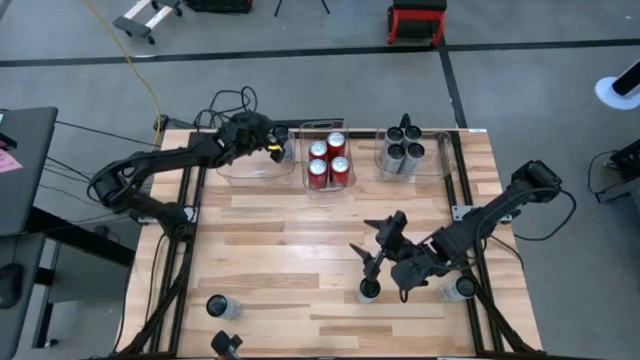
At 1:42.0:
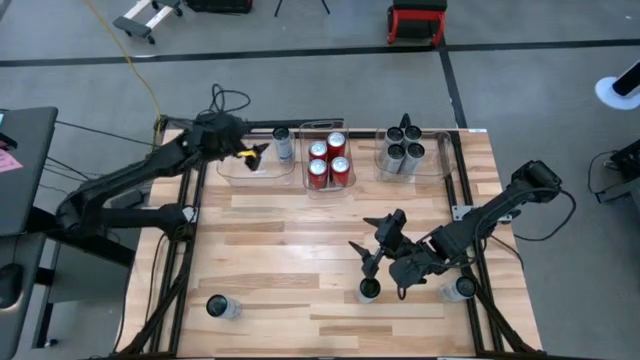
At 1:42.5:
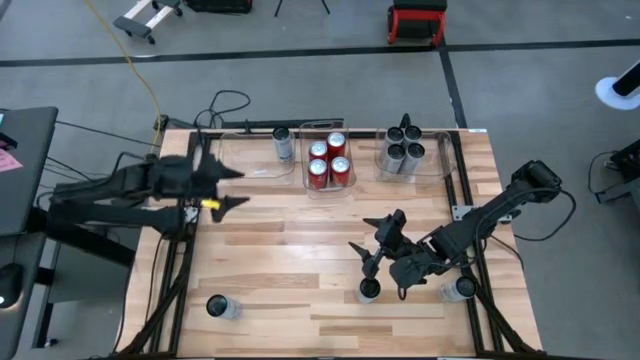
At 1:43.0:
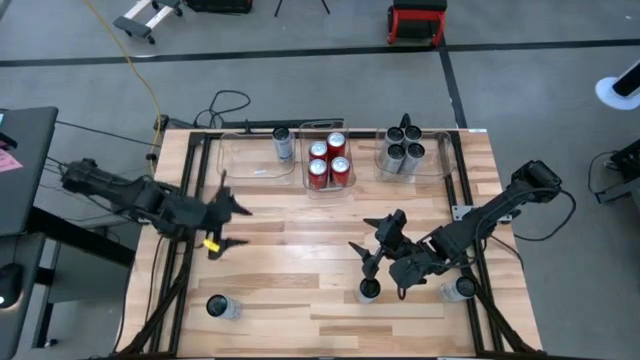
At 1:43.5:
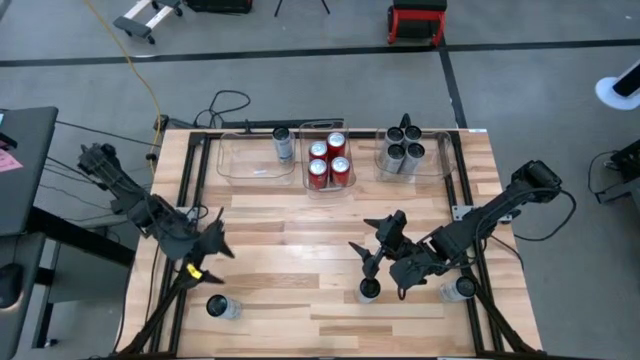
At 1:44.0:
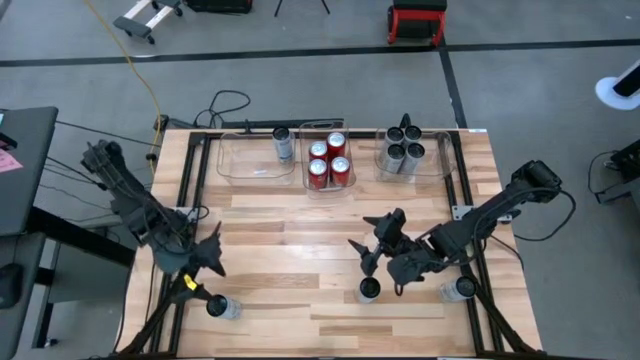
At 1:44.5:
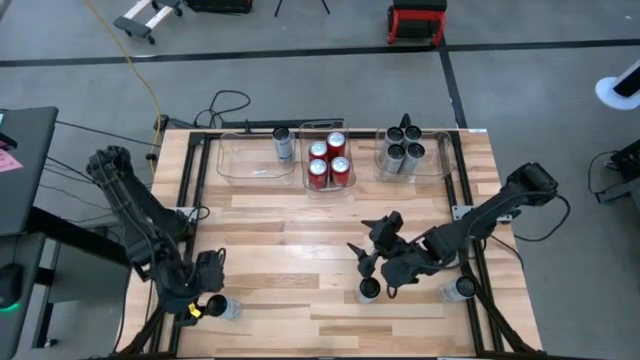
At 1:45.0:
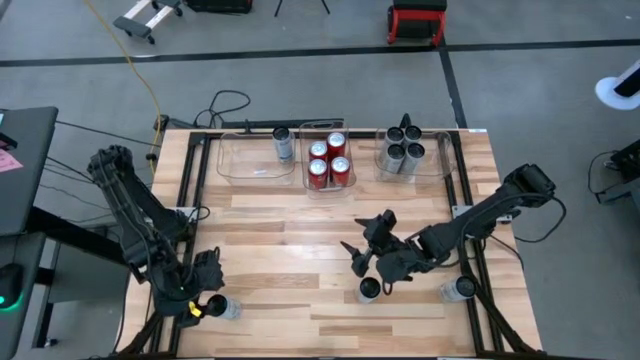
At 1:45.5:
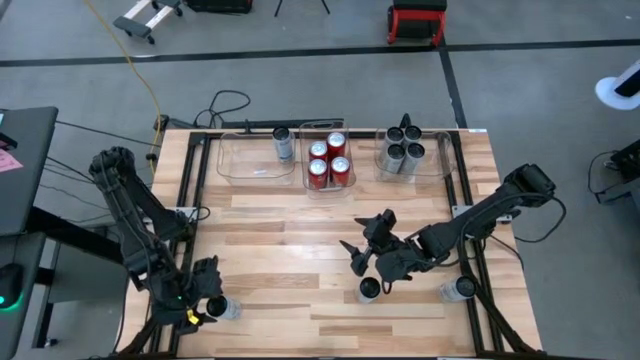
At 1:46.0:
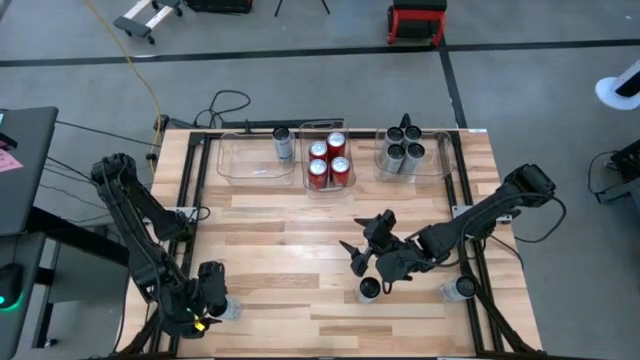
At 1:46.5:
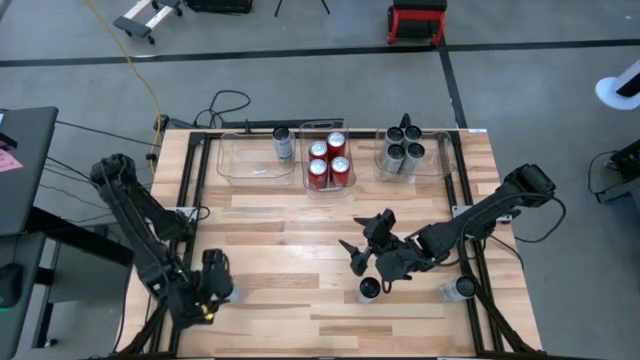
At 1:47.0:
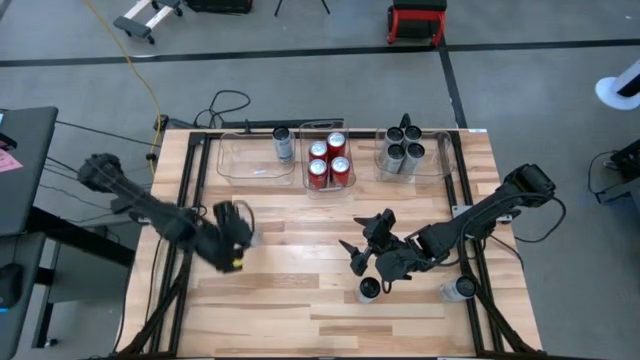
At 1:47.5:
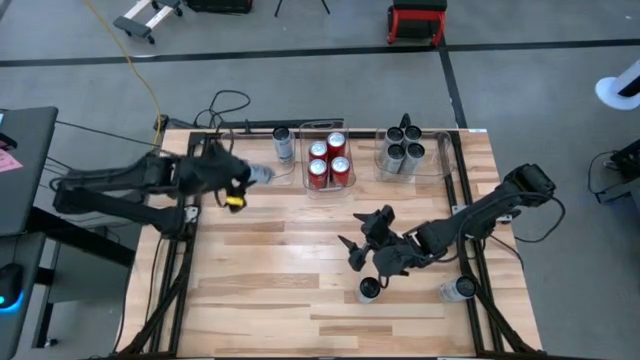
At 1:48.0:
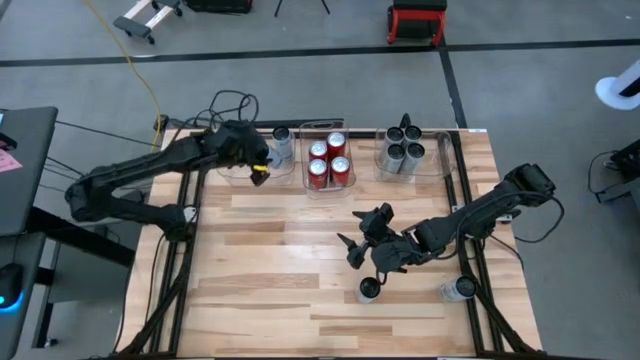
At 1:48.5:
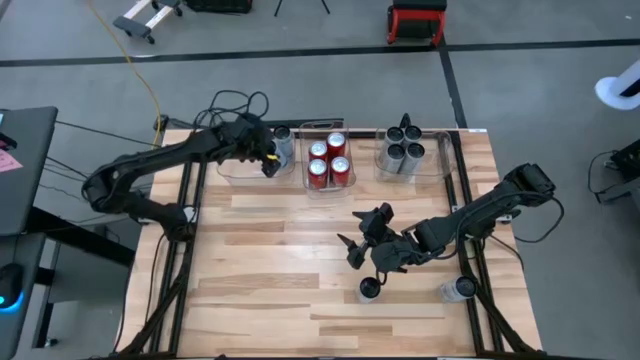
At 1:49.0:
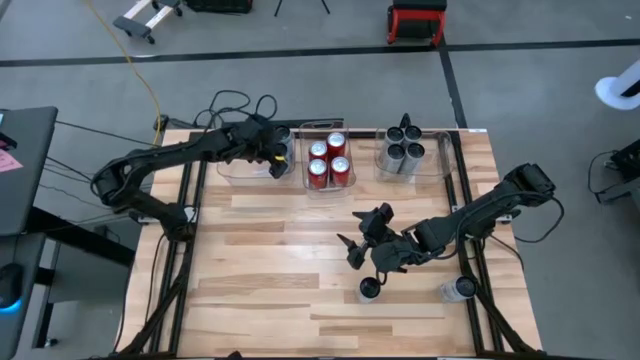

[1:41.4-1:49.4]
Task: Sort soda cans
Put the white-blue soda can into the left transparent bin

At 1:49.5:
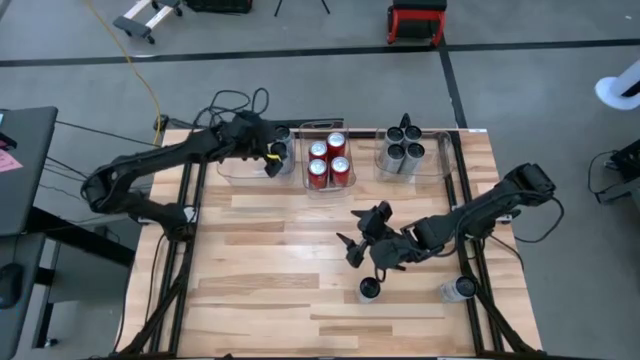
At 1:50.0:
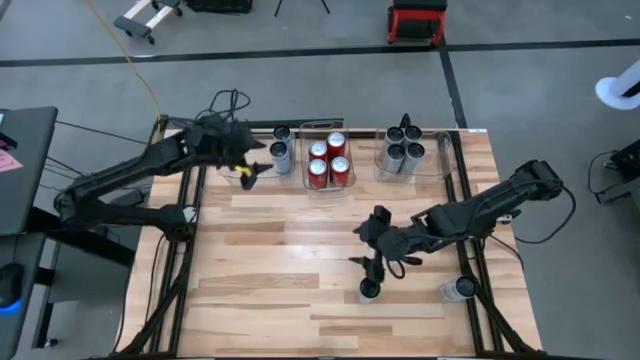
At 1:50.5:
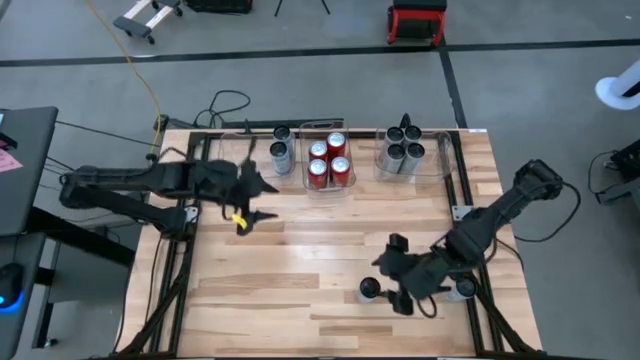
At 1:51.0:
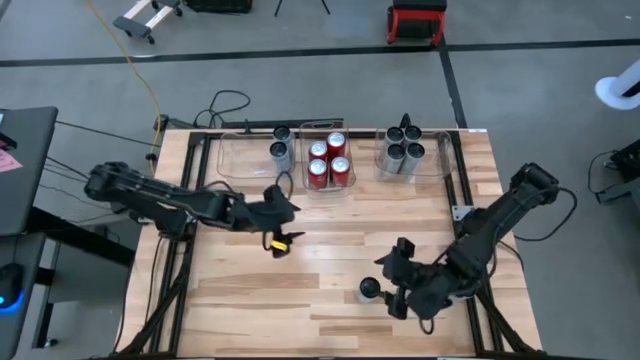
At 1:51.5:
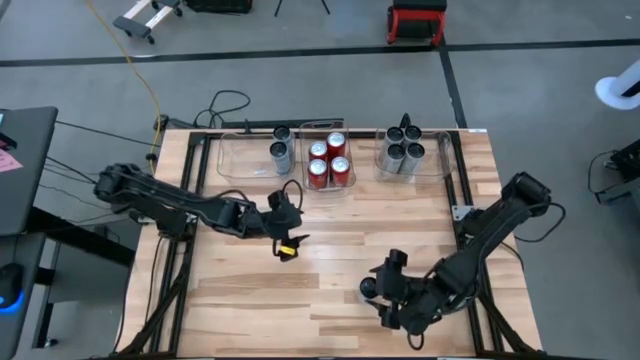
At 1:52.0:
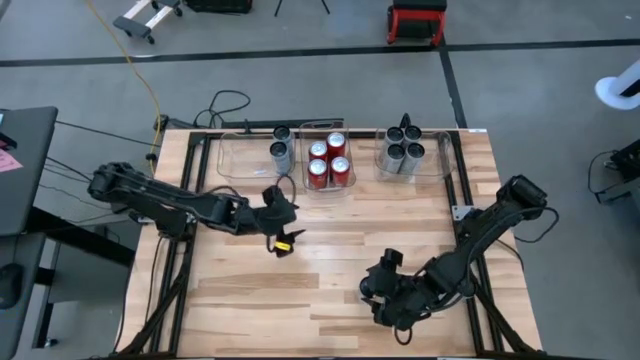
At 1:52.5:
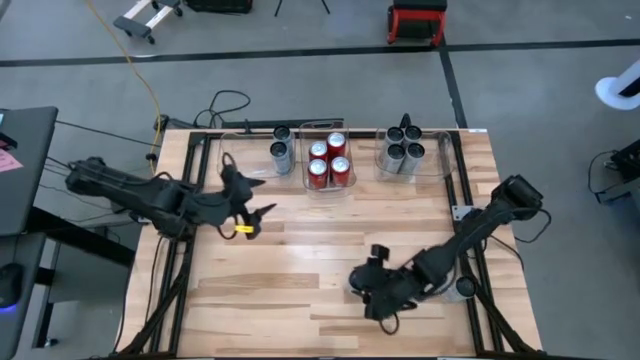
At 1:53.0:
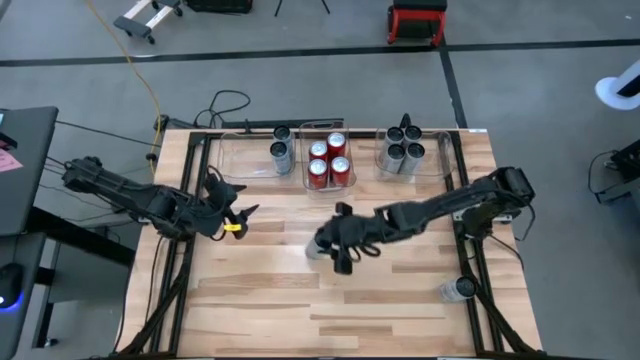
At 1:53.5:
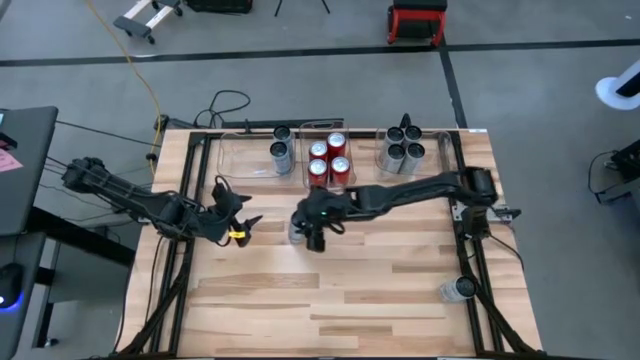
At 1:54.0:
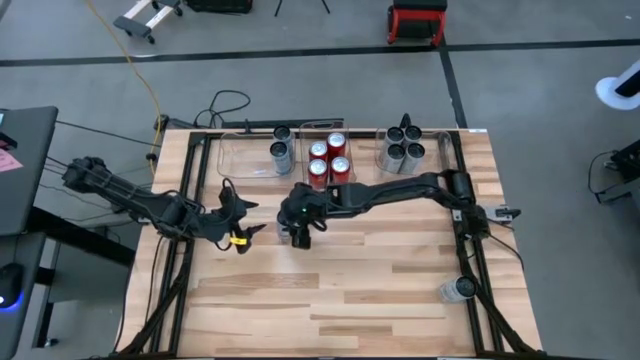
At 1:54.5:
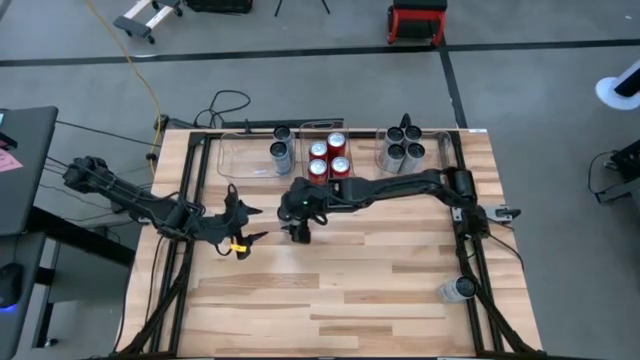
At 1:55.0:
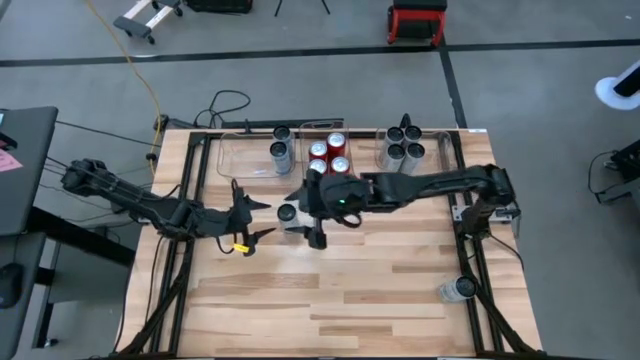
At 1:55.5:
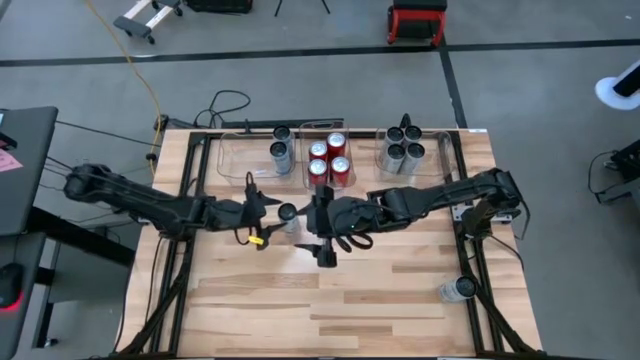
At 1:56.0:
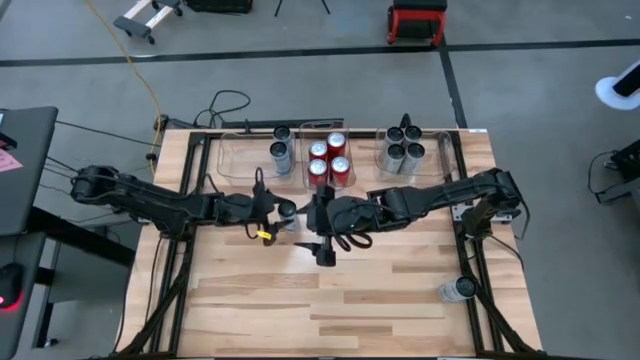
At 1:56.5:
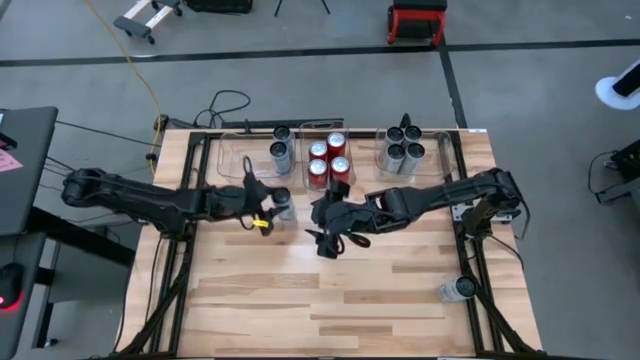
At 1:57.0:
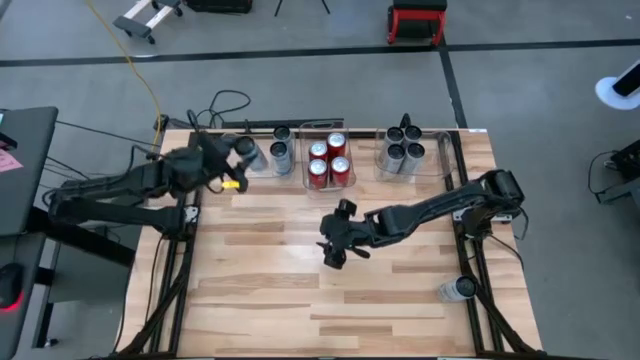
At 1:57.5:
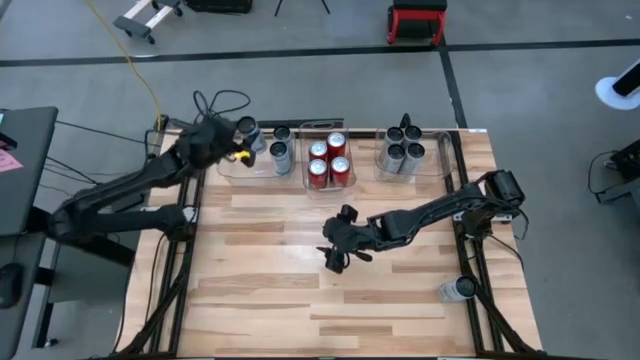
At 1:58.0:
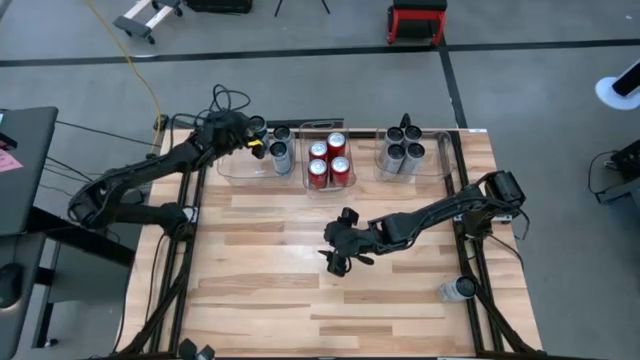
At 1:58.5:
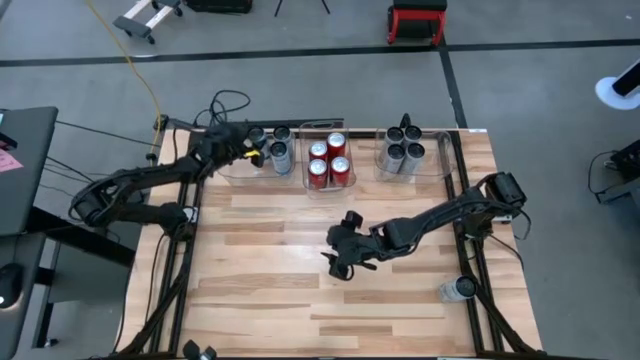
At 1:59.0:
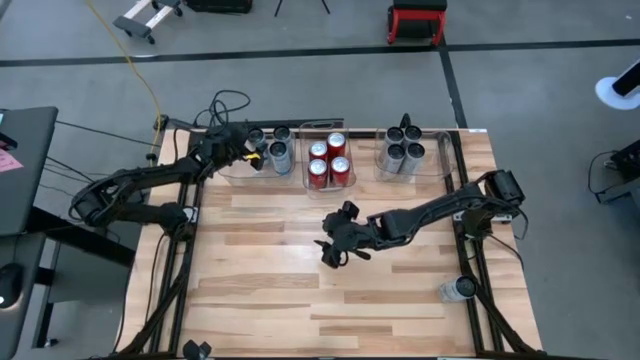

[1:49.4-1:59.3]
Put the white-blue soda can into the left transparent bin
